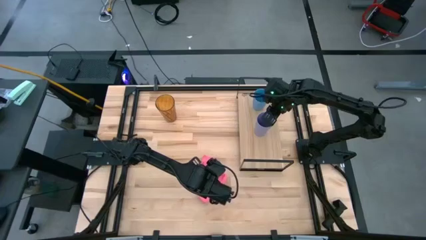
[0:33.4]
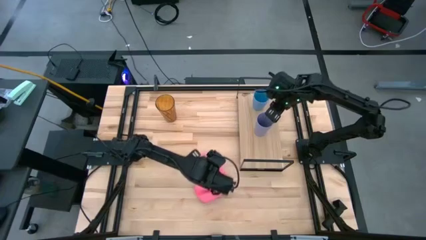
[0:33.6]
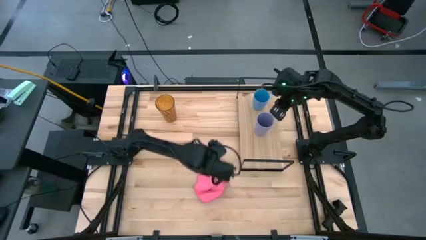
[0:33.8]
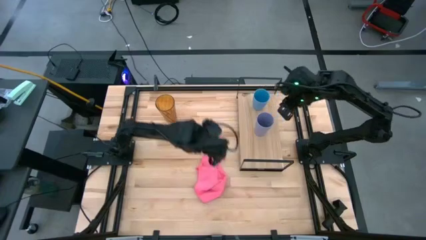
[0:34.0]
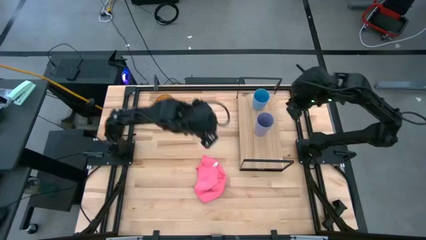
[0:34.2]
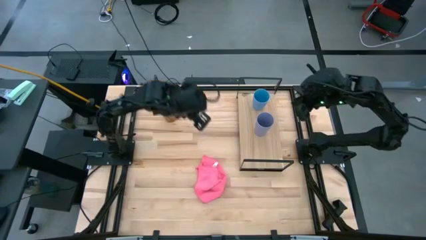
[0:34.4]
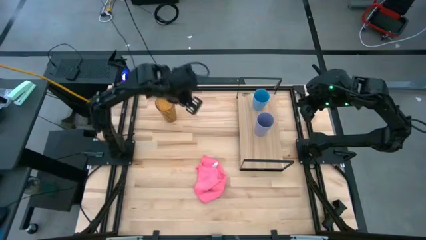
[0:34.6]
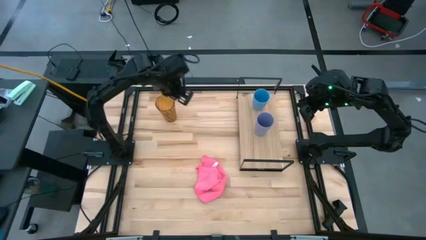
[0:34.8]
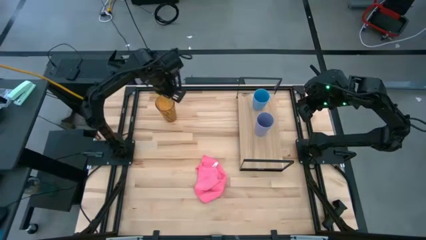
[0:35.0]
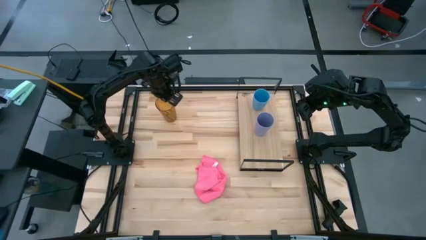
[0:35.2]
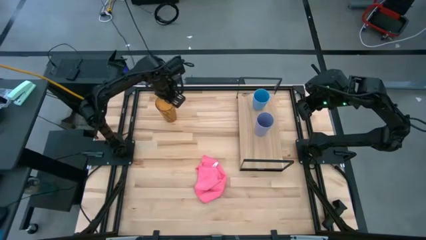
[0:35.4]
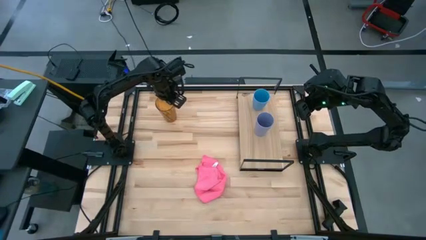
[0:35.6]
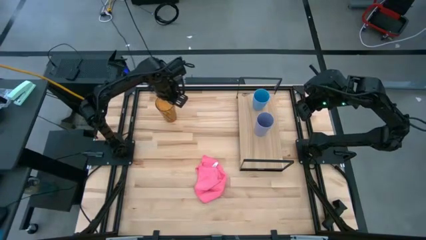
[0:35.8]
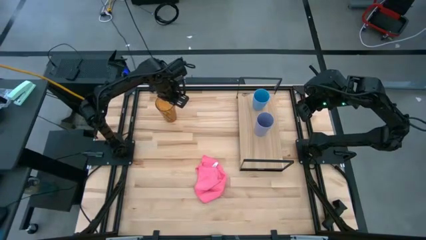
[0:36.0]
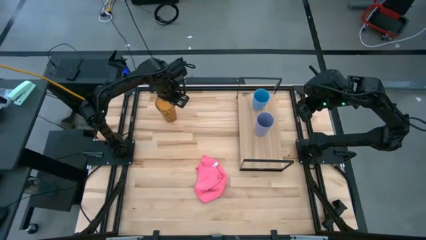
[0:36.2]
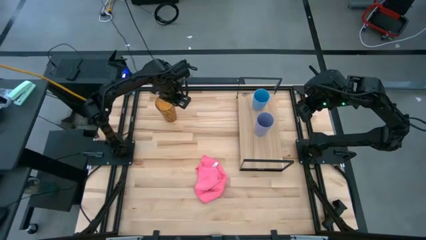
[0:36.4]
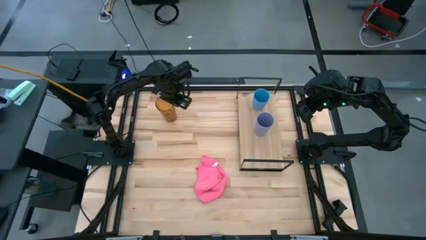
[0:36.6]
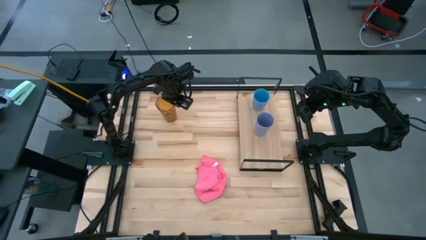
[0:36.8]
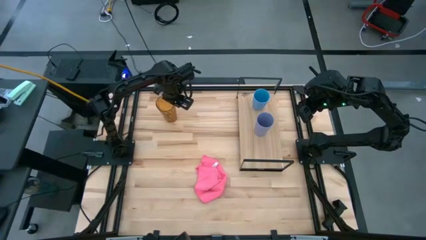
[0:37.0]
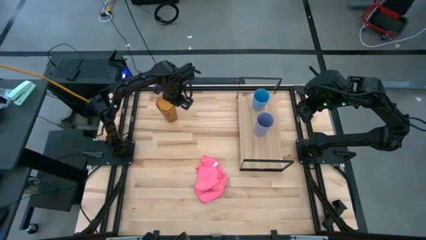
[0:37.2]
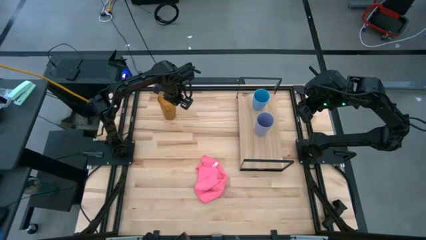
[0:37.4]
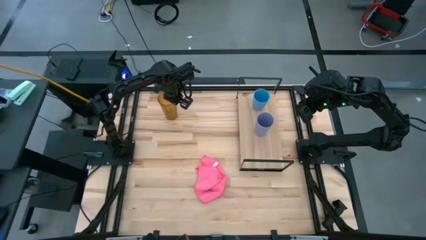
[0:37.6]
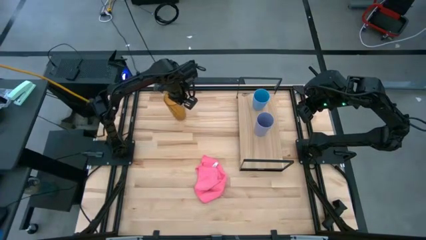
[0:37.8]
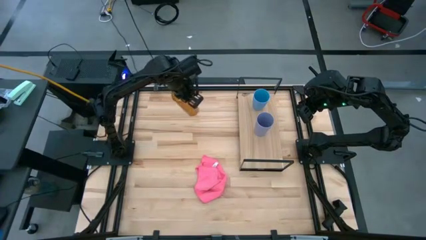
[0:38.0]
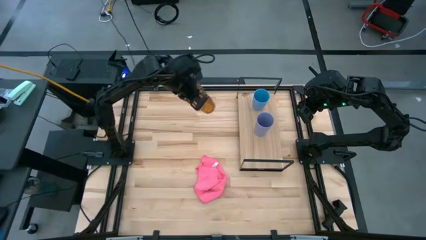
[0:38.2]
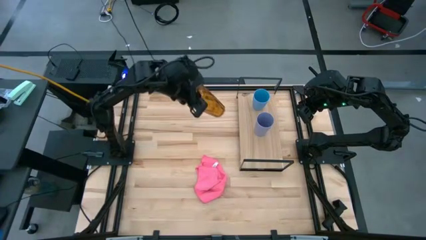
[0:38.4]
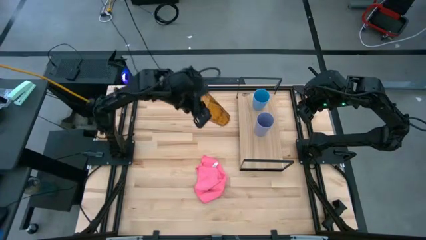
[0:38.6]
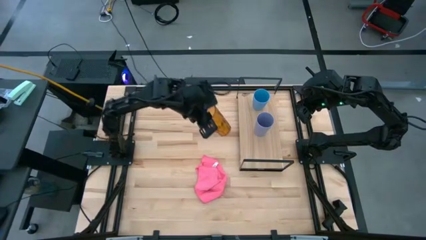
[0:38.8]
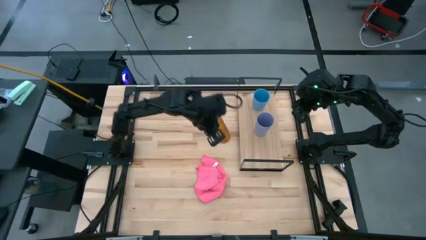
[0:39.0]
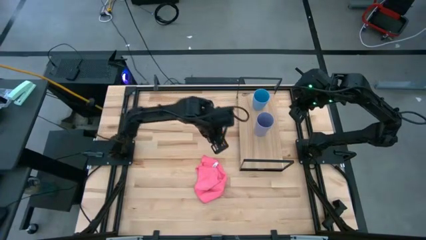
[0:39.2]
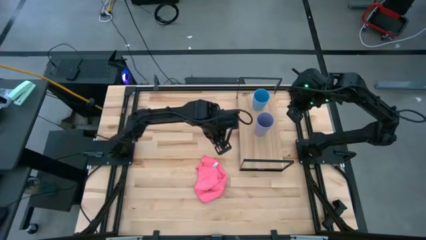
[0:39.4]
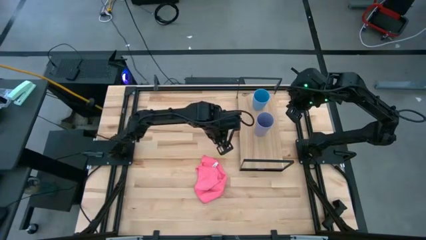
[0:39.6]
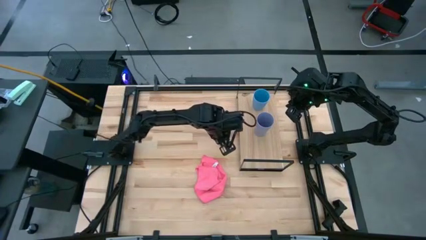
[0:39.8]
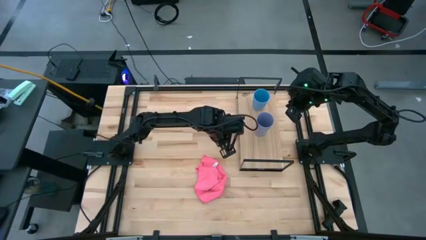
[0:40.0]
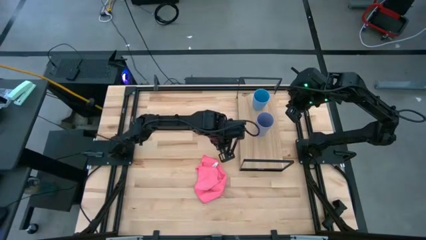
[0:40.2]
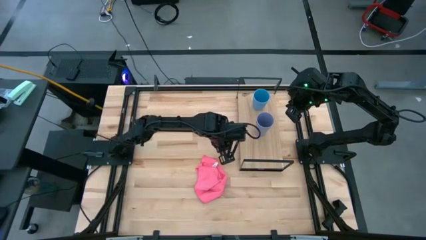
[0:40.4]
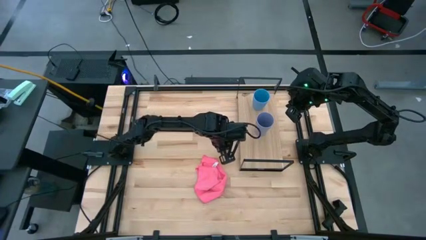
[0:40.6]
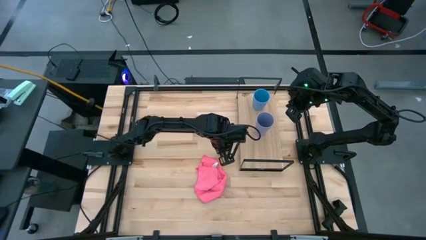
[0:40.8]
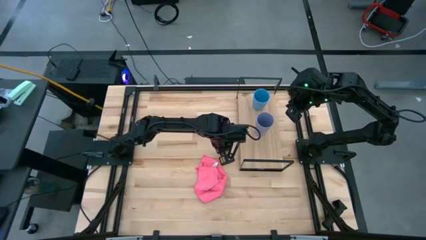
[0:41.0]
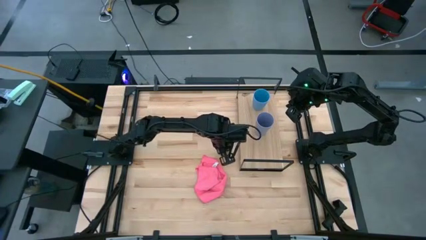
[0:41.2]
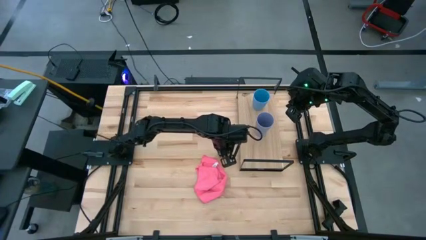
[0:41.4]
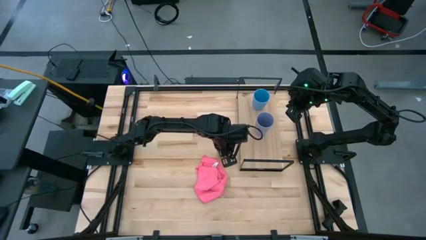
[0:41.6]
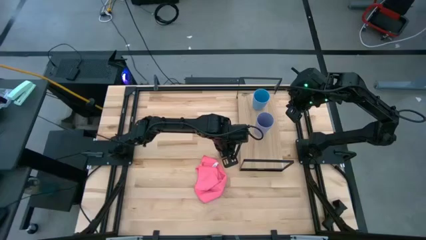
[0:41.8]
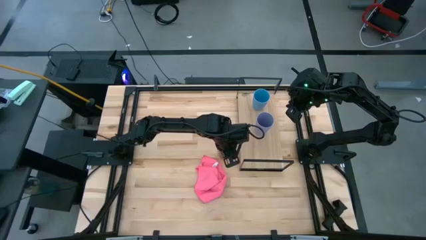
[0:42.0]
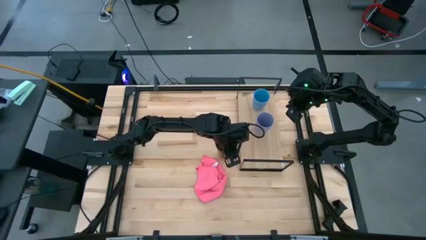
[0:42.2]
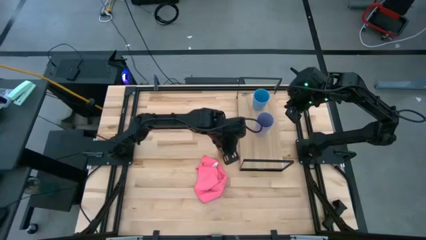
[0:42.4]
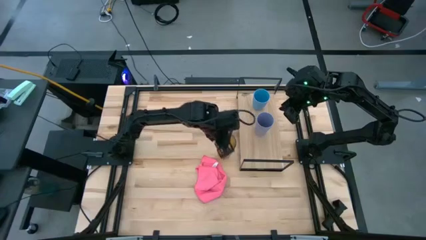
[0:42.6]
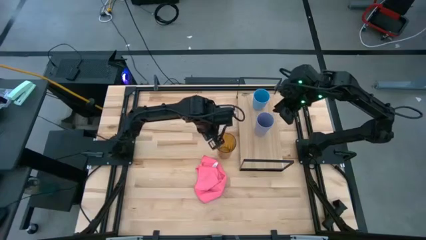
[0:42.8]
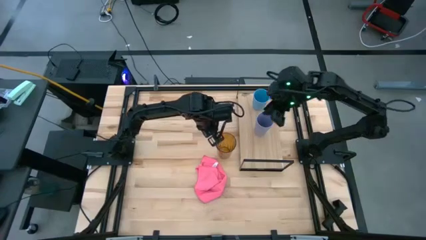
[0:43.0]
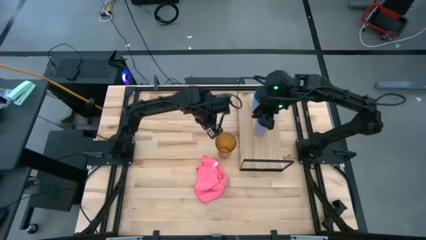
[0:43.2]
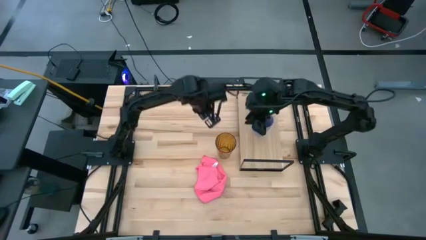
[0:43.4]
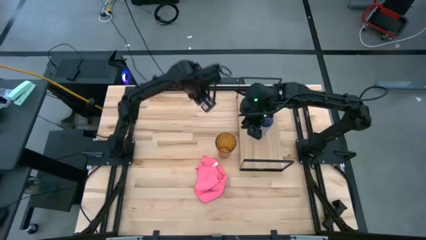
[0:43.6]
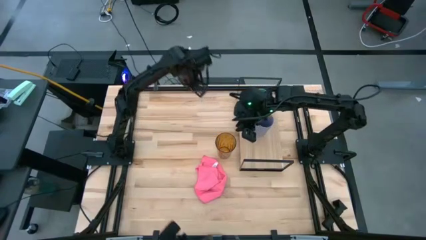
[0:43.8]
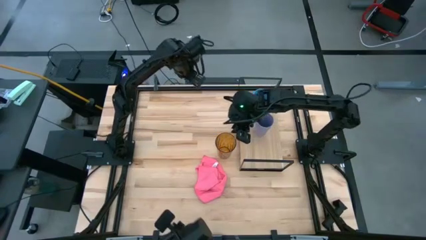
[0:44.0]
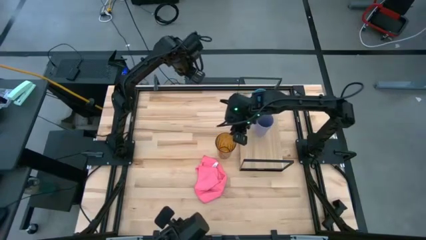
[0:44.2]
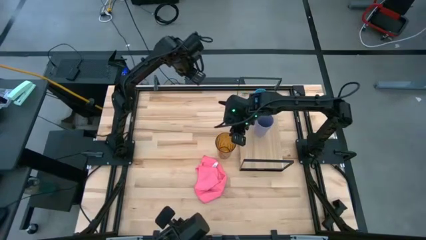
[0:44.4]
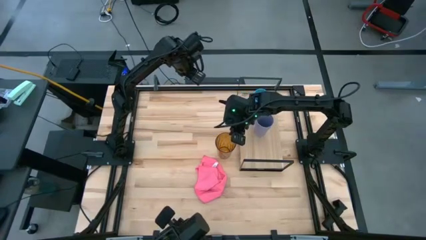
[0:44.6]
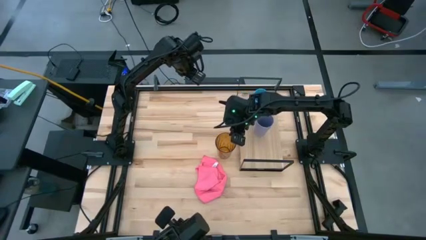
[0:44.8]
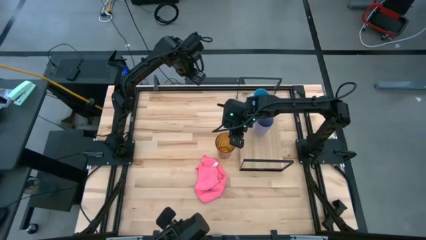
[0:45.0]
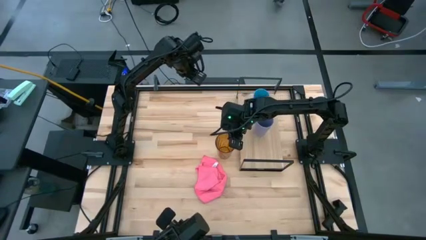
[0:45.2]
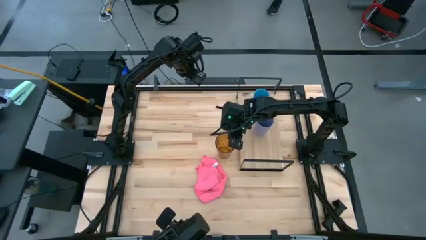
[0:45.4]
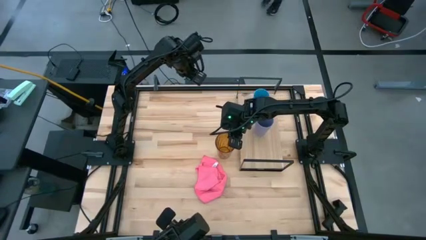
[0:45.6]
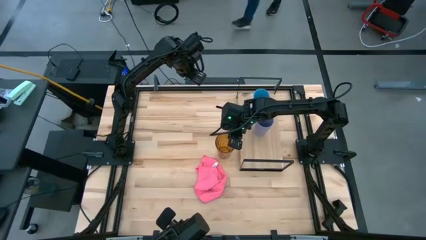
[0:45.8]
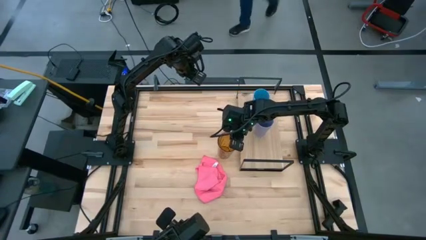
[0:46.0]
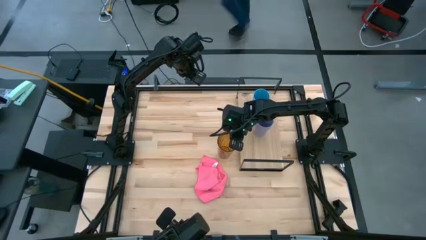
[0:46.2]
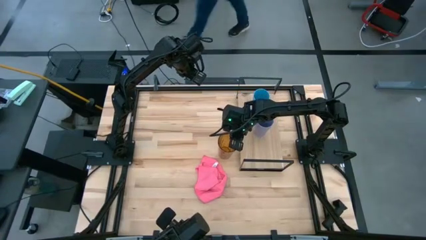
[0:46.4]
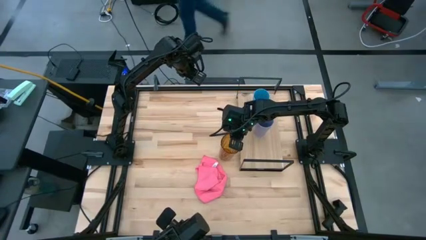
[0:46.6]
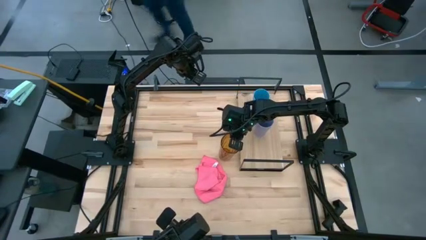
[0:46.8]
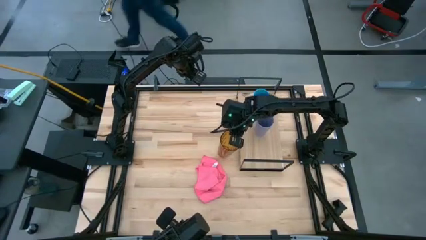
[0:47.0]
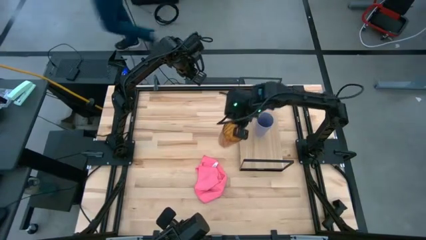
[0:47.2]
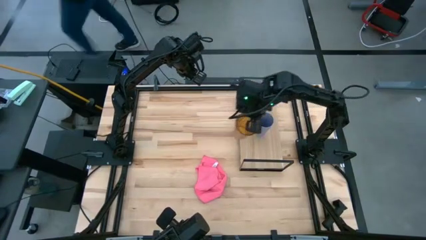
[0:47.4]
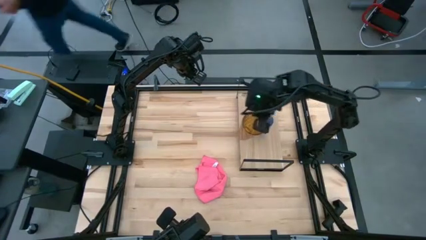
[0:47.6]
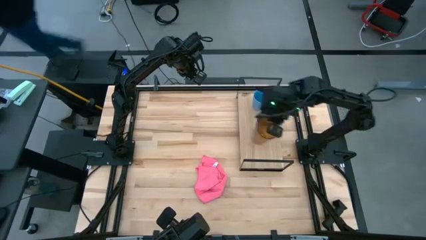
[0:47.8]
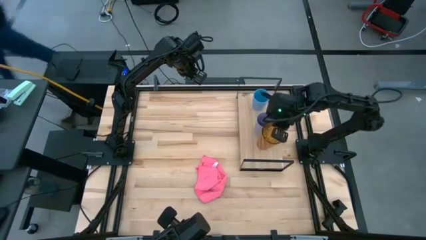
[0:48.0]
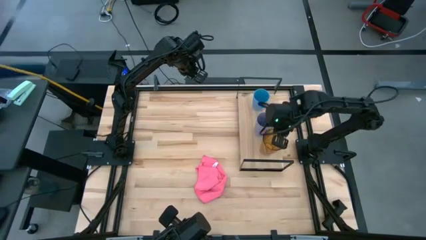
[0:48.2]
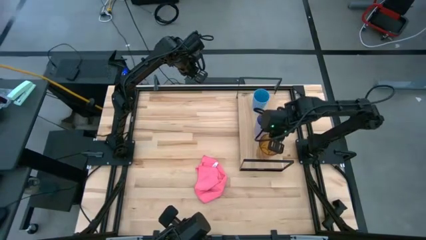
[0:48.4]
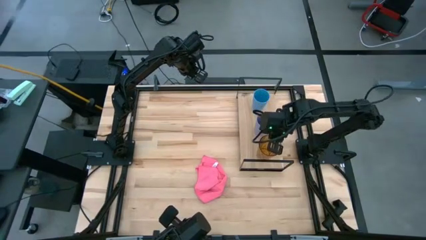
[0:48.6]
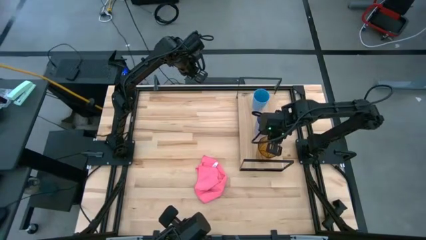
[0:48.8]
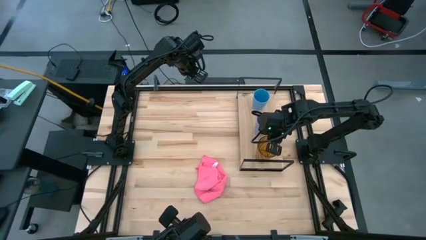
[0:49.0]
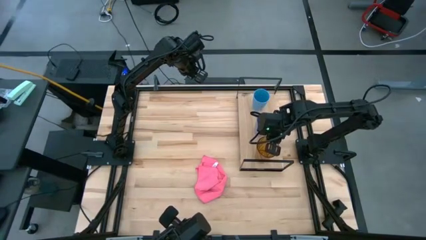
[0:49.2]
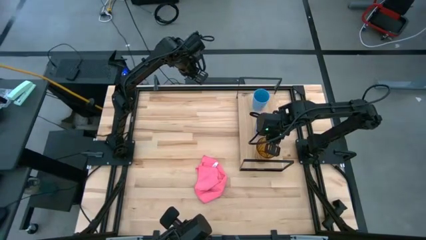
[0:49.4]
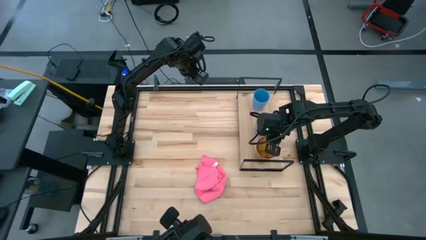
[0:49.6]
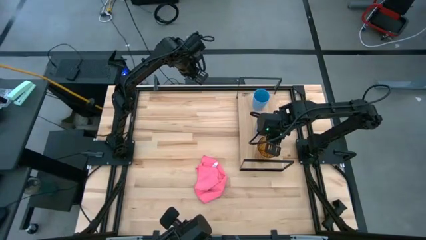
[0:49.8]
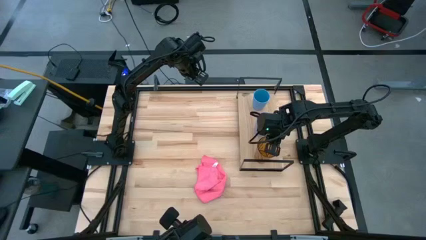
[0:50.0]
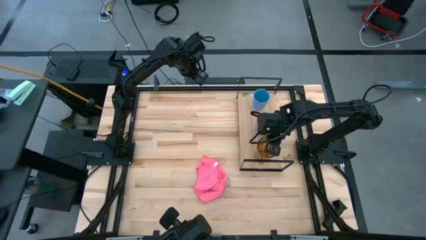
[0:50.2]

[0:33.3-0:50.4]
Task: Stack small to large cups/mugs on shelf
Put the brown cup on the shelf
